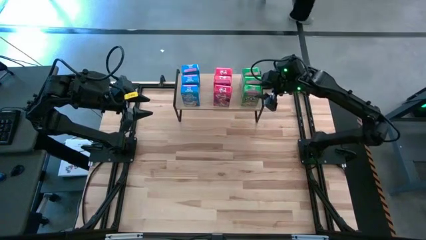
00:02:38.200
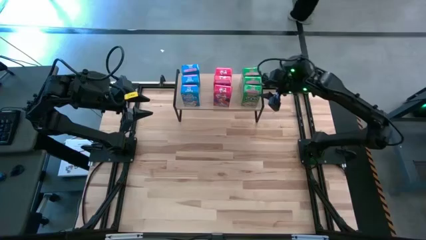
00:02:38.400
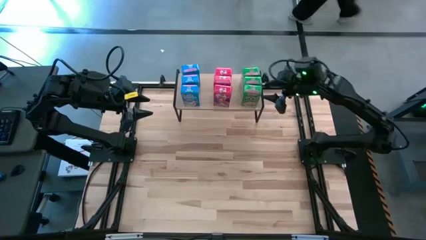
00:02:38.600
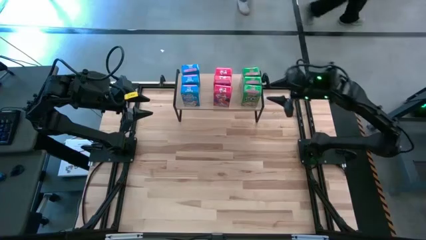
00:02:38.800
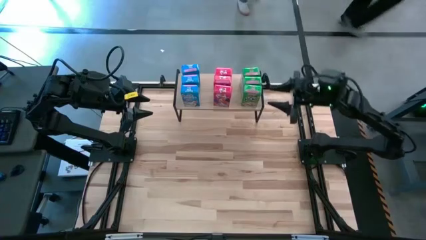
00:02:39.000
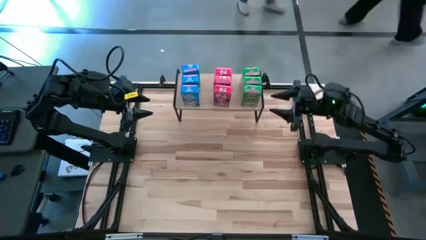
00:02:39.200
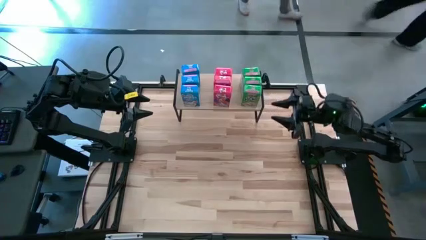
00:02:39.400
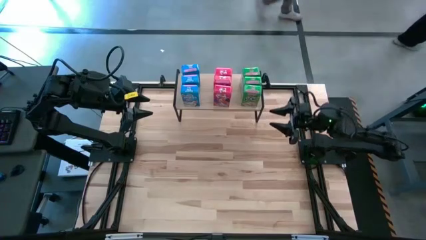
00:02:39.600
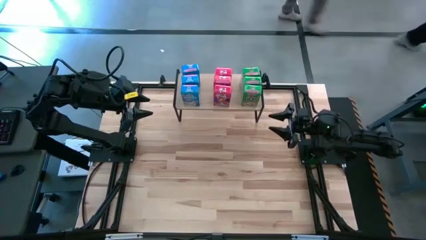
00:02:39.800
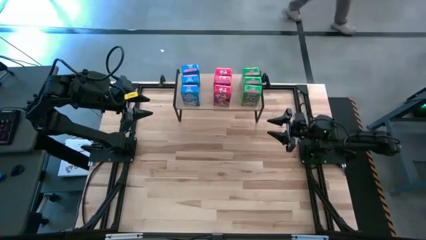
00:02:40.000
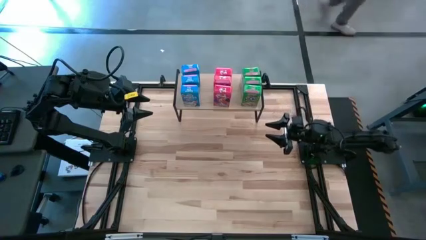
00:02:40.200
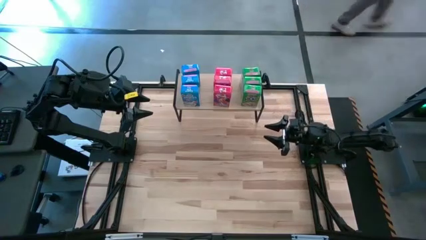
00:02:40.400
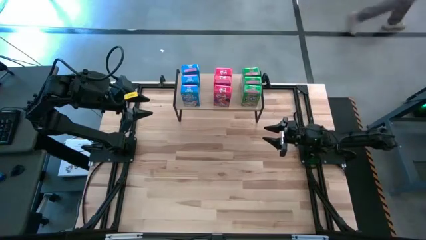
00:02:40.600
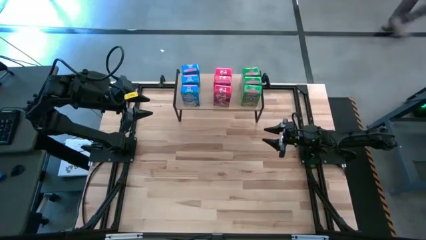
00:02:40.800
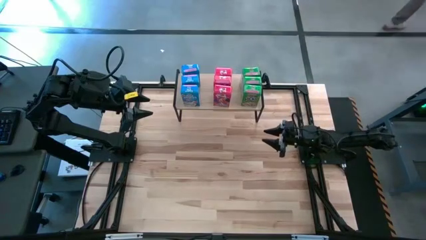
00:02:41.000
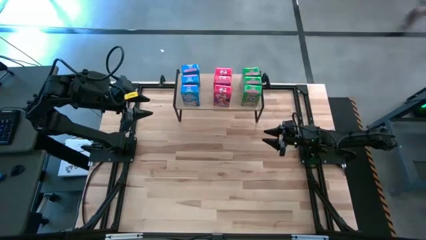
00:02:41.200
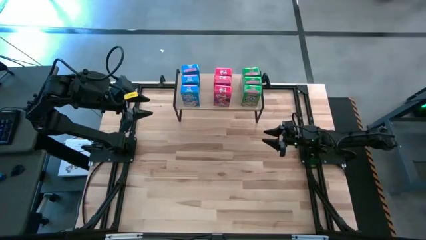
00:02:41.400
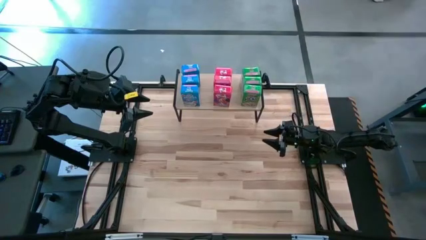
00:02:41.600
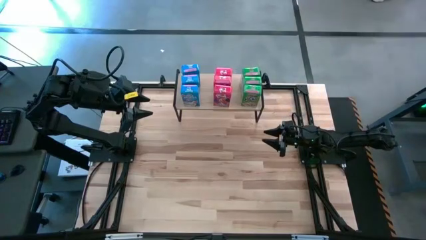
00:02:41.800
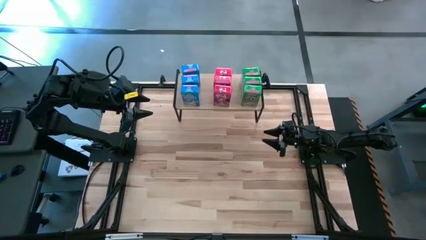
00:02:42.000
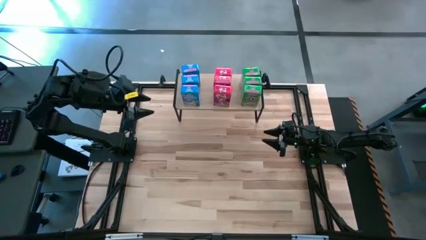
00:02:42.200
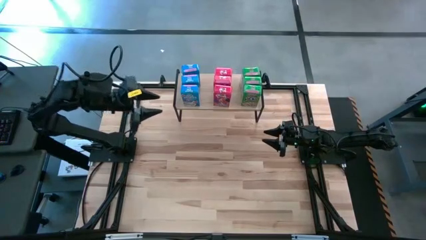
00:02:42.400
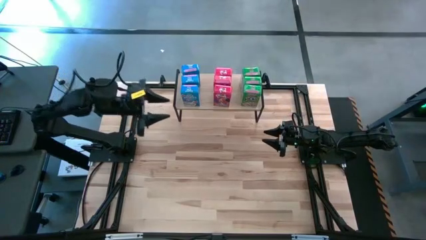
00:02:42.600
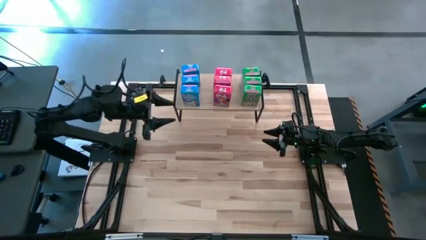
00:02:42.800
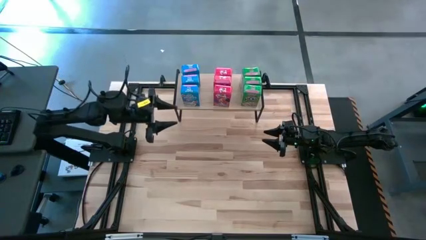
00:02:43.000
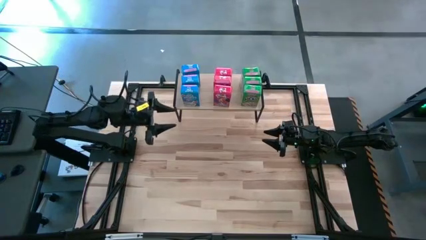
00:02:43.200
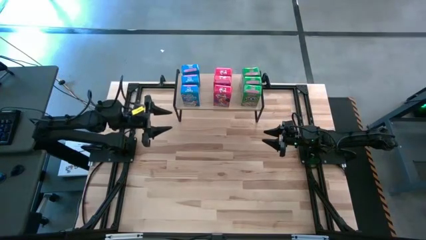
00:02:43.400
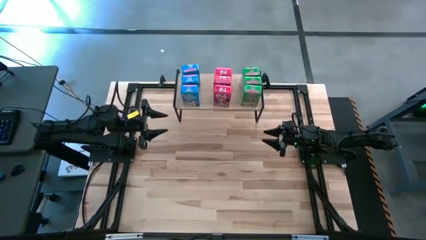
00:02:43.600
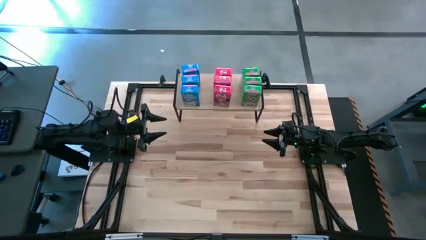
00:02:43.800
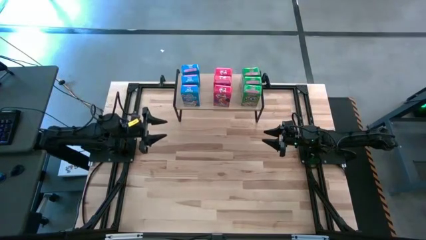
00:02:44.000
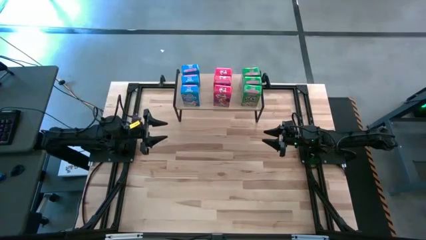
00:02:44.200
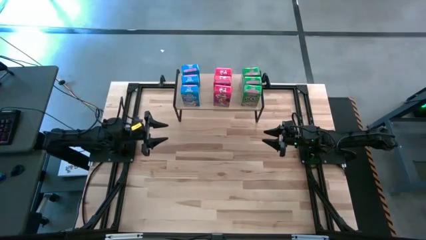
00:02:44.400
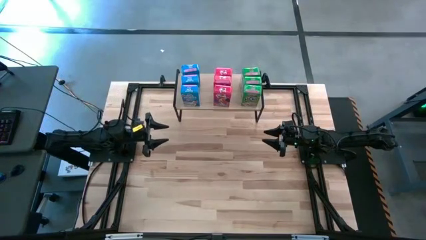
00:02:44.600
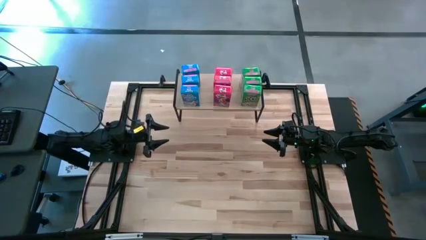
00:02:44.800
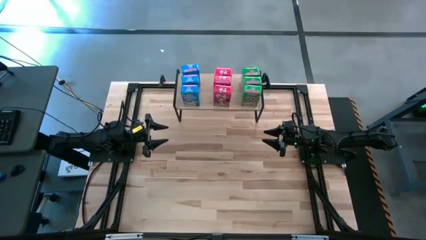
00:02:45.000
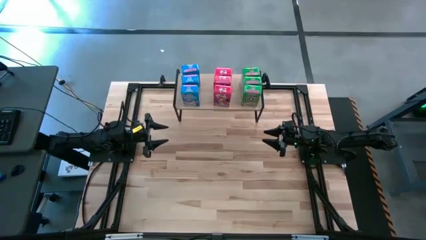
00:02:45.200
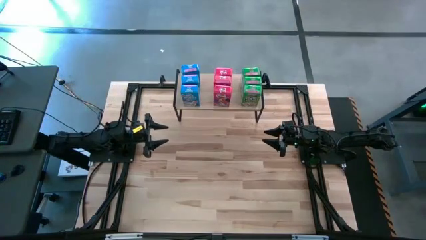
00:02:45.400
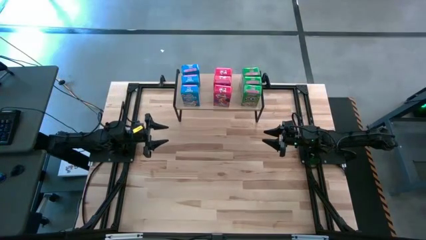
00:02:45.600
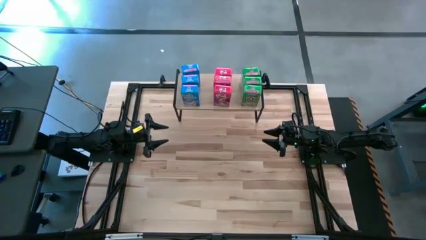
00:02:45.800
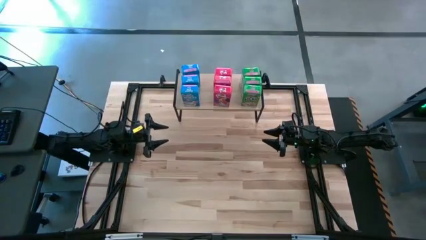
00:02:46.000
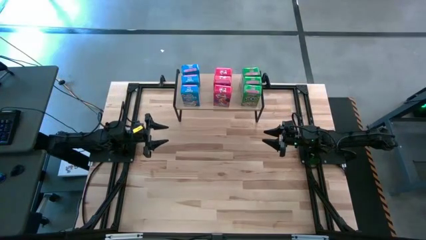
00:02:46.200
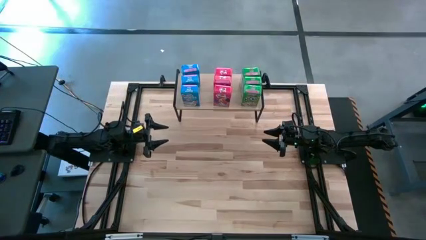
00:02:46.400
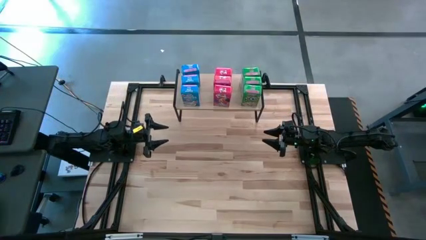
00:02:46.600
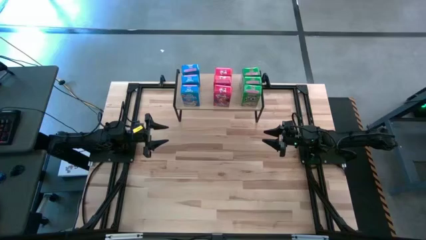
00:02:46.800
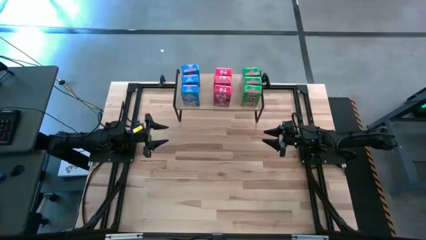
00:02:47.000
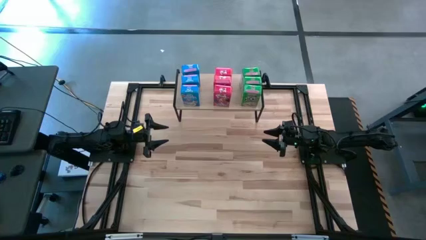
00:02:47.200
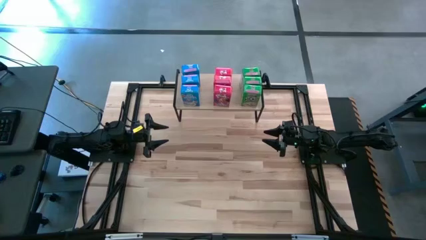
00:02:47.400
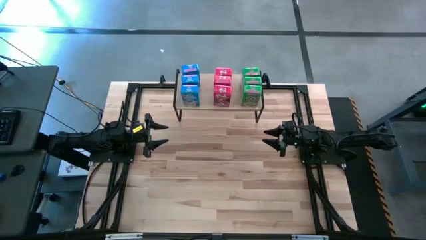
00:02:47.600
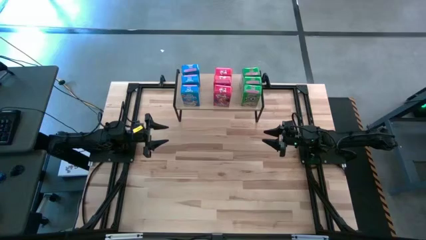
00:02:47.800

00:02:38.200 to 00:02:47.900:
Task: Stack cereal on shelf
Return to Home Position

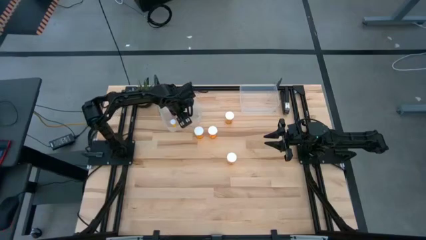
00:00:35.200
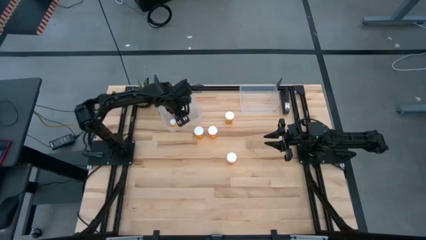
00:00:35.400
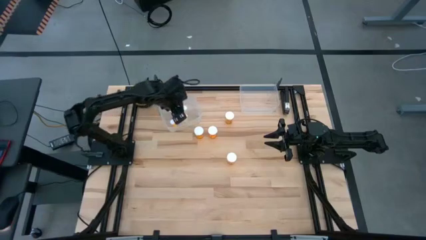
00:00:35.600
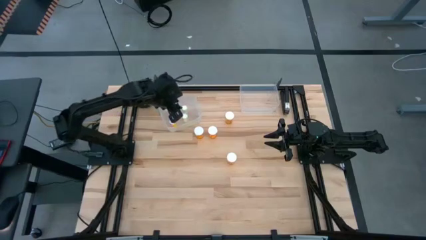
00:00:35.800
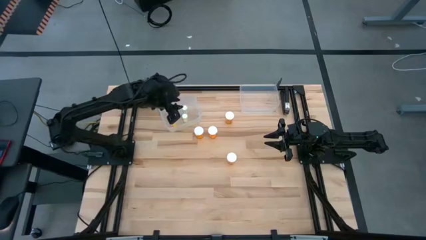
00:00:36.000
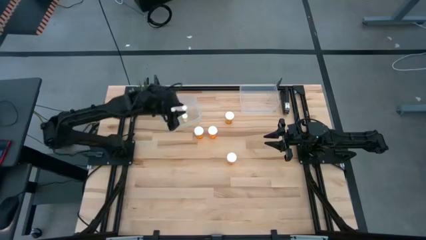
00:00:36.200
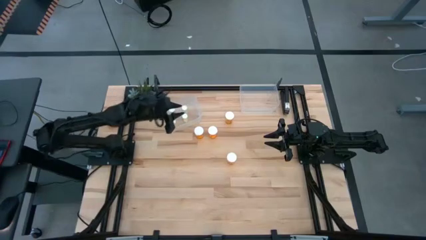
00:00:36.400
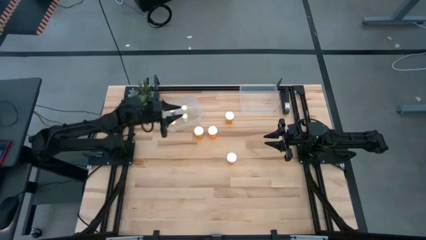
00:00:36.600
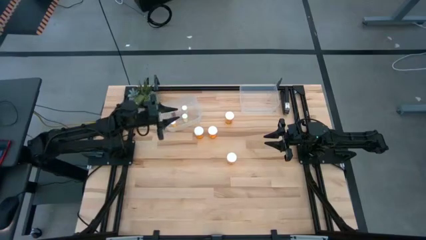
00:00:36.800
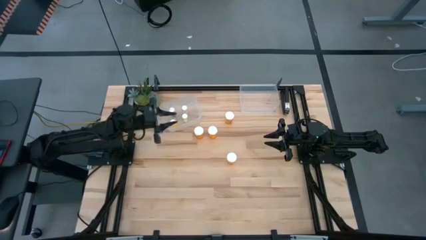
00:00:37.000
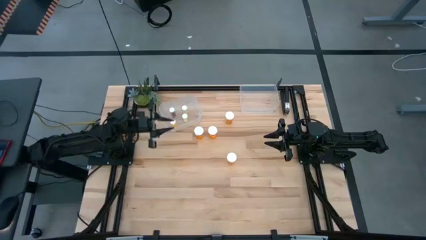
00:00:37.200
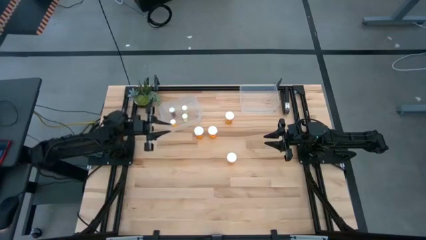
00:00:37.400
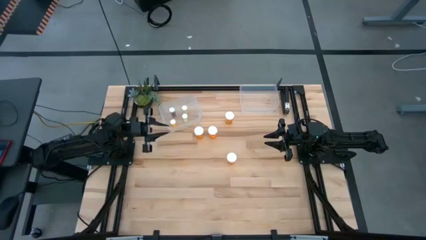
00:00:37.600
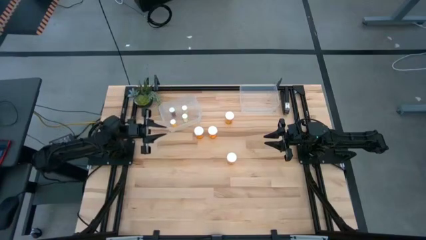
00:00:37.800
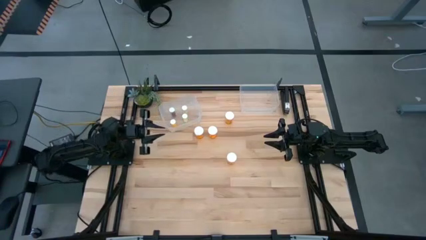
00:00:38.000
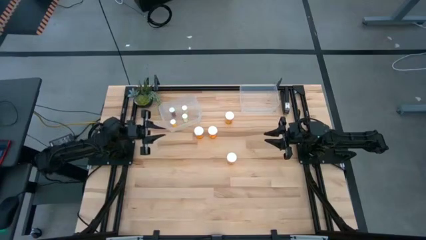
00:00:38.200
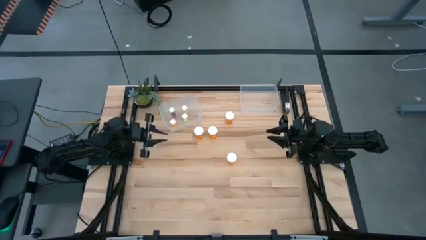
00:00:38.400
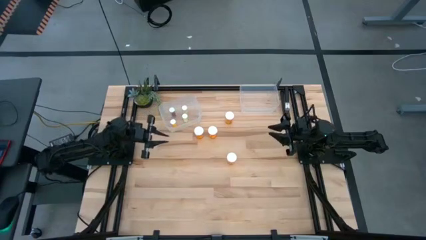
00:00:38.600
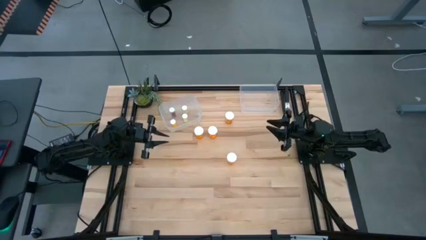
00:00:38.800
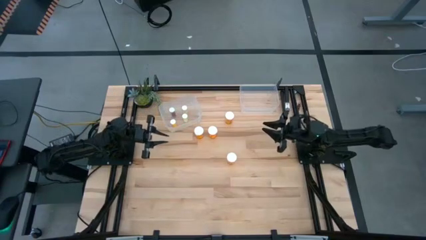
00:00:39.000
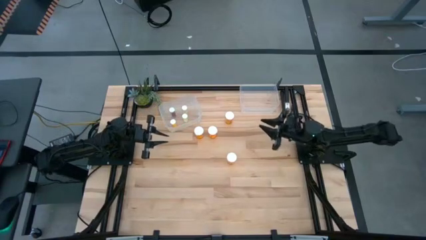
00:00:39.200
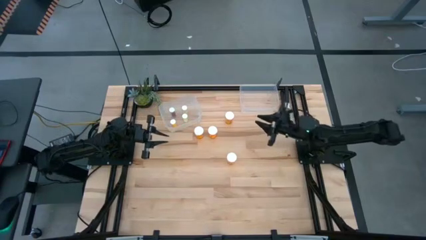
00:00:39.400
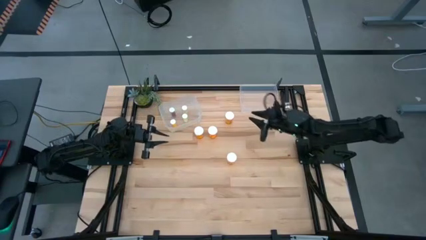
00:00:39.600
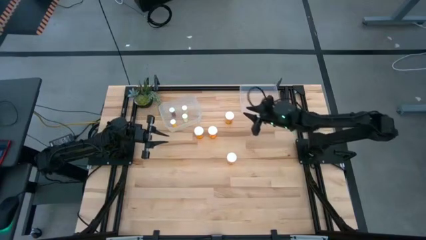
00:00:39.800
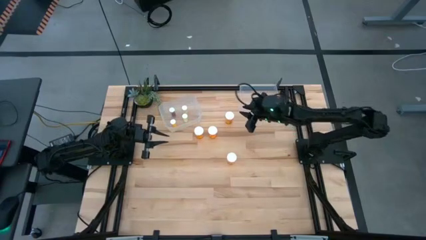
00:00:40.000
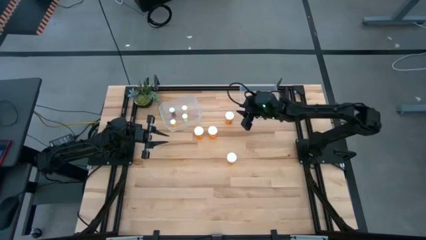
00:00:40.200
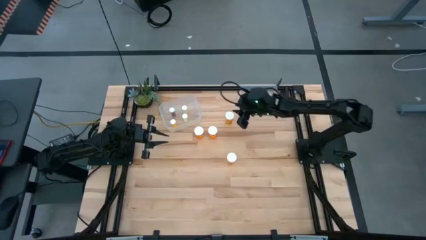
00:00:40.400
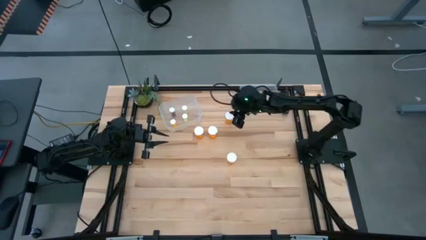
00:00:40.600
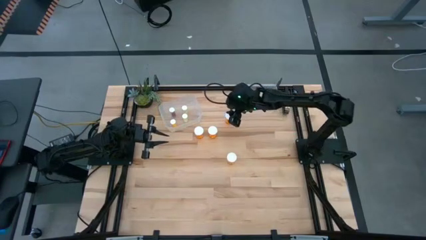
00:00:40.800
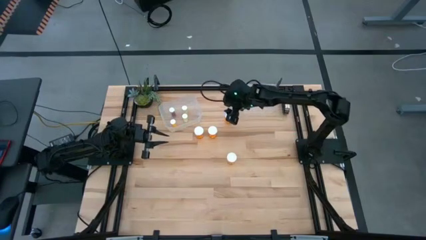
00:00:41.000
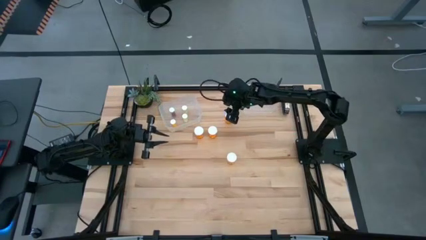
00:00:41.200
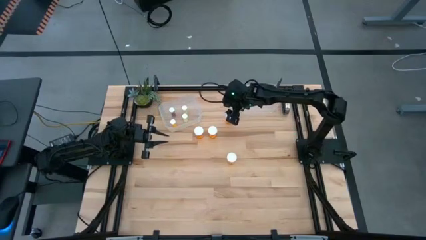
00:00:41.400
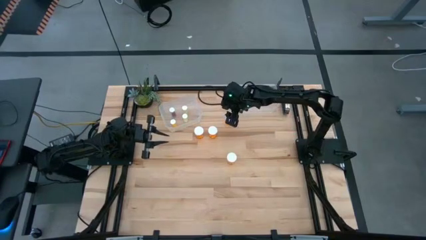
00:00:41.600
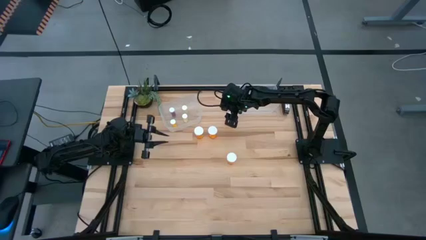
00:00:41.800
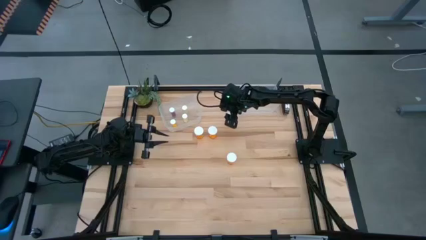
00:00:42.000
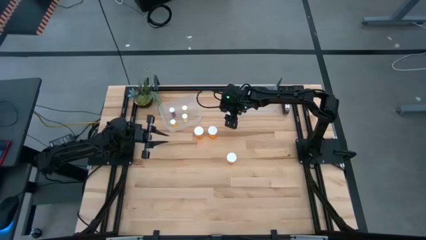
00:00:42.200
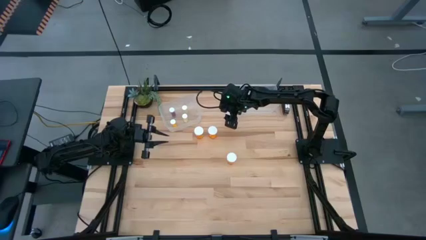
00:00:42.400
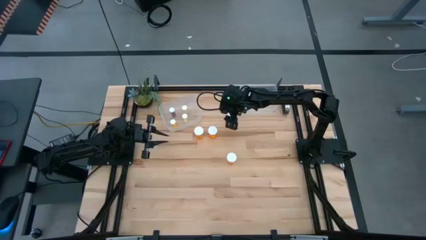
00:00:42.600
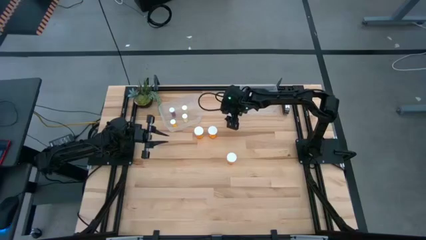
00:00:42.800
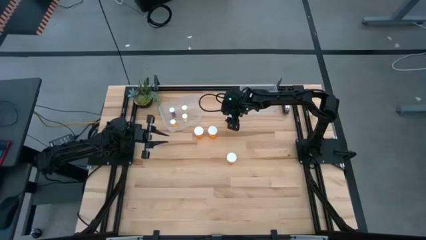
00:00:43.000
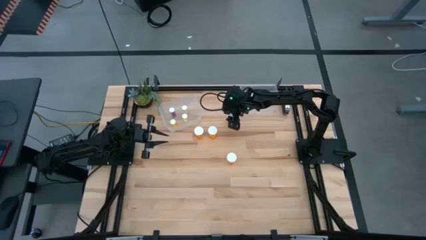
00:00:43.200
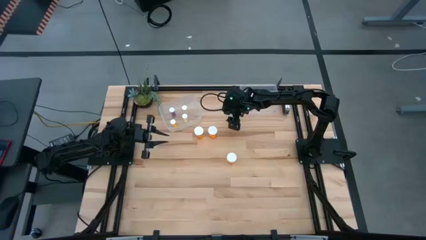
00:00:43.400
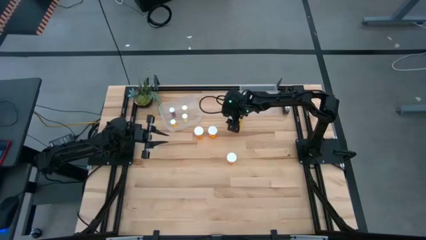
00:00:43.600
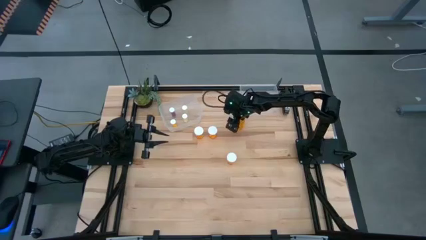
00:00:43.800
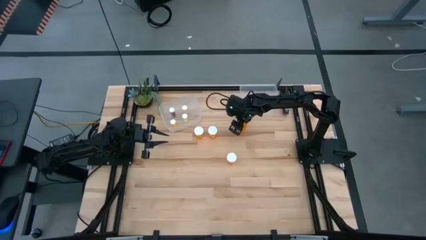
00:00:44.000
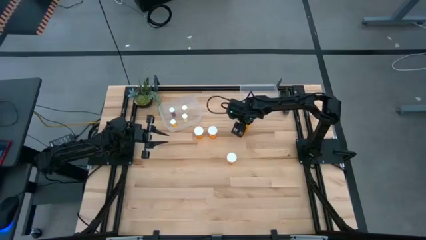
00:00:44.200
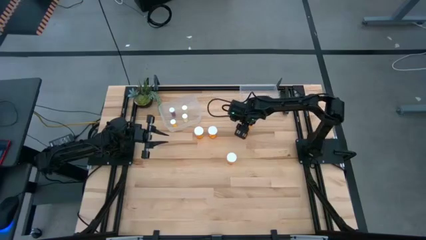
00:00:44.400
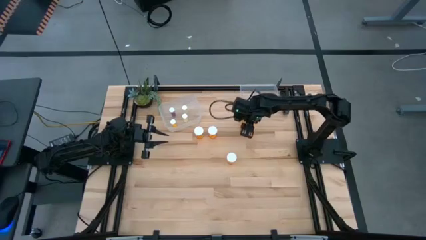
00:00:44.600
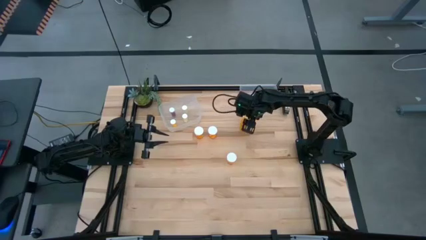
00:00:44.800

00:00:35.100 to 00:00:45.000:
Task: Pick and place medicine bottles into bin by pill shape (circle, oval)
Put the orange large pill bottle into the right transparent bin
